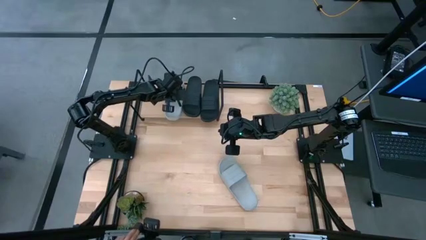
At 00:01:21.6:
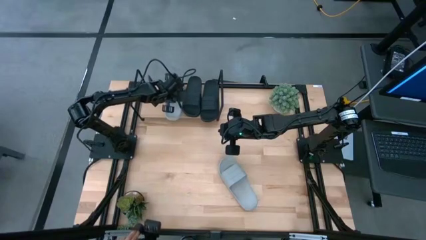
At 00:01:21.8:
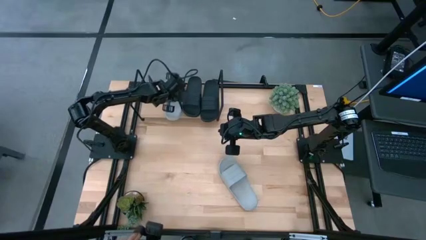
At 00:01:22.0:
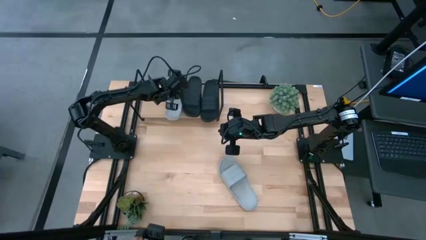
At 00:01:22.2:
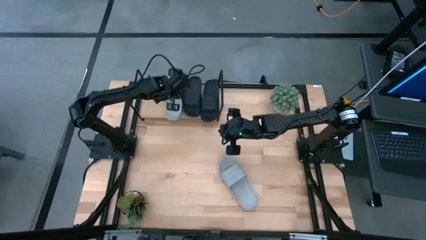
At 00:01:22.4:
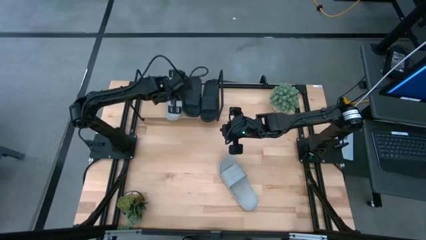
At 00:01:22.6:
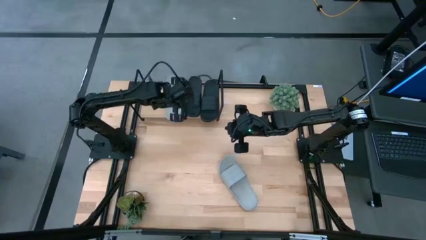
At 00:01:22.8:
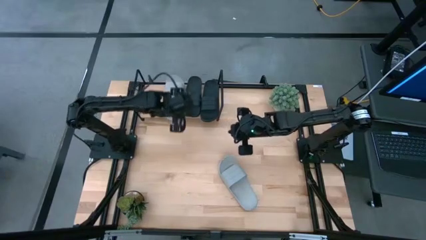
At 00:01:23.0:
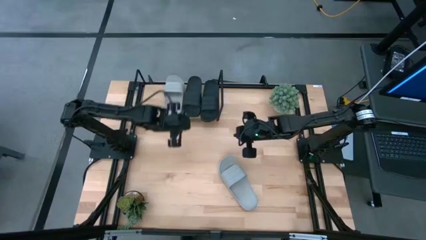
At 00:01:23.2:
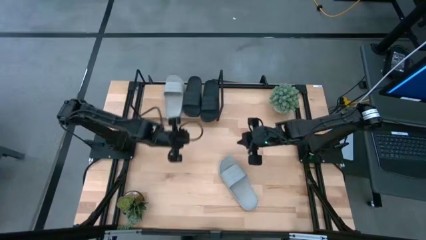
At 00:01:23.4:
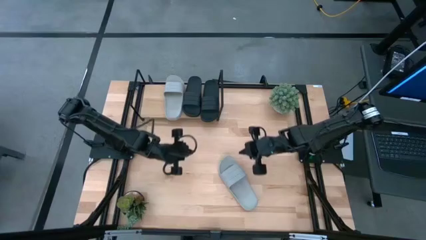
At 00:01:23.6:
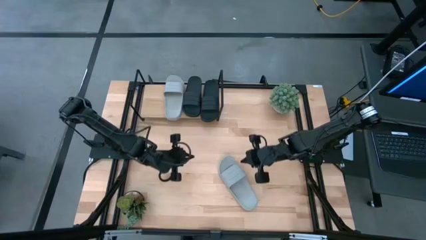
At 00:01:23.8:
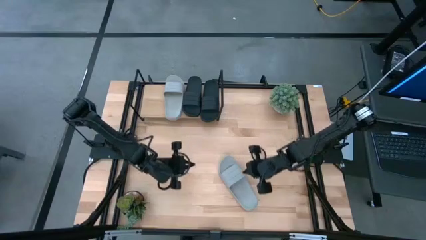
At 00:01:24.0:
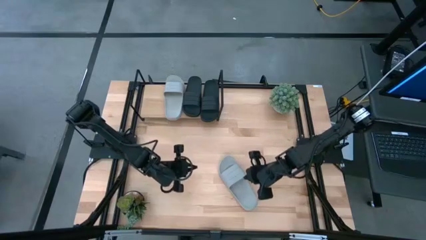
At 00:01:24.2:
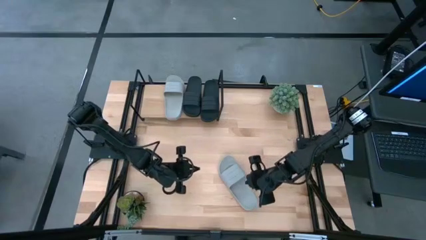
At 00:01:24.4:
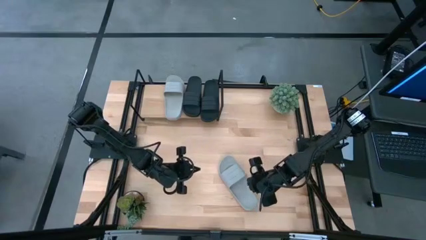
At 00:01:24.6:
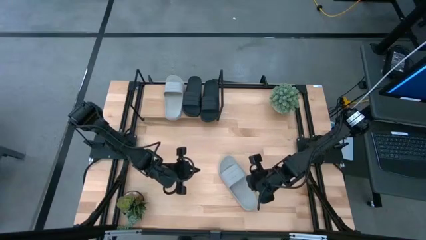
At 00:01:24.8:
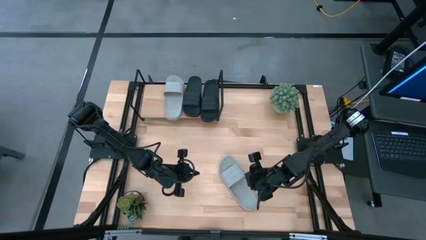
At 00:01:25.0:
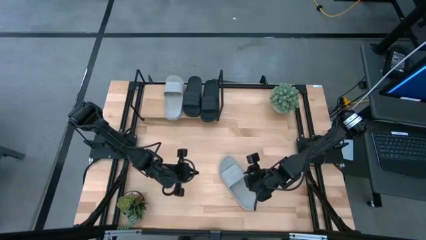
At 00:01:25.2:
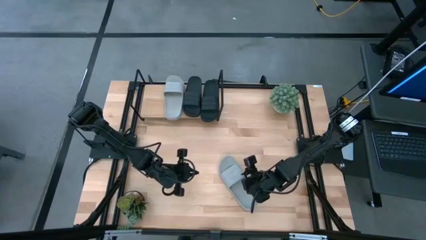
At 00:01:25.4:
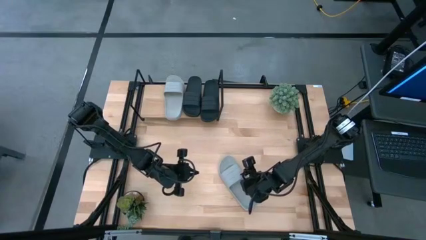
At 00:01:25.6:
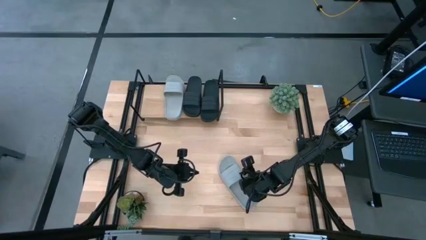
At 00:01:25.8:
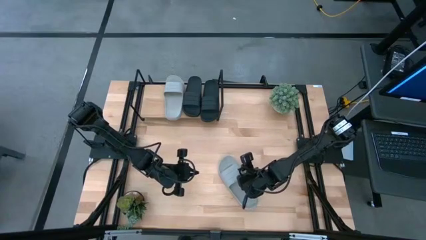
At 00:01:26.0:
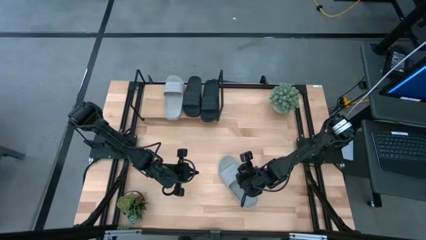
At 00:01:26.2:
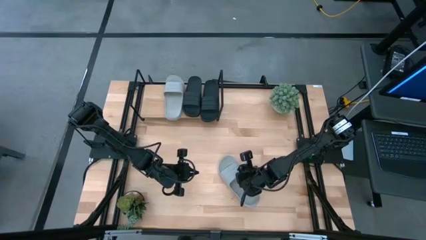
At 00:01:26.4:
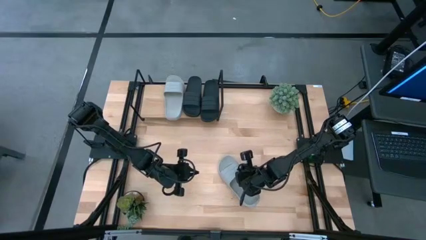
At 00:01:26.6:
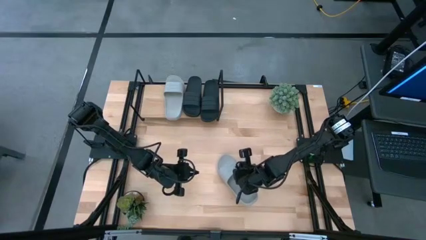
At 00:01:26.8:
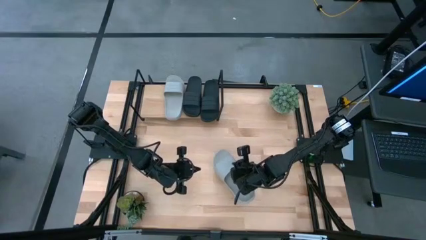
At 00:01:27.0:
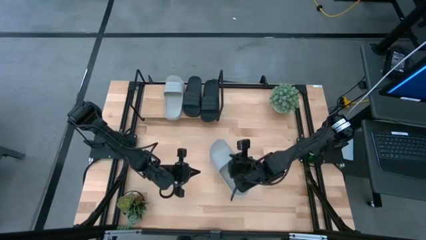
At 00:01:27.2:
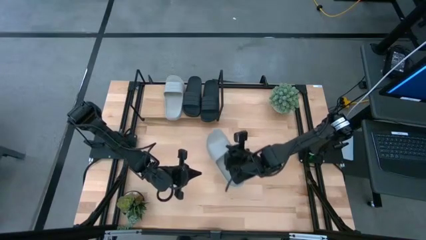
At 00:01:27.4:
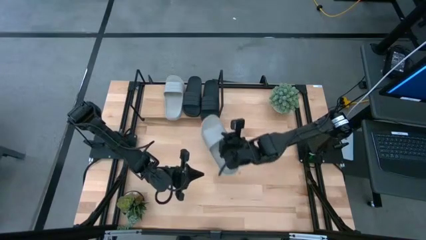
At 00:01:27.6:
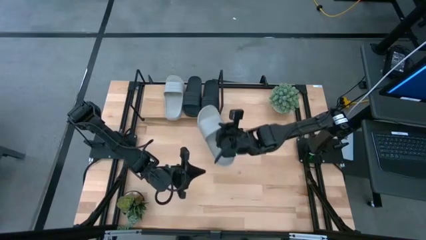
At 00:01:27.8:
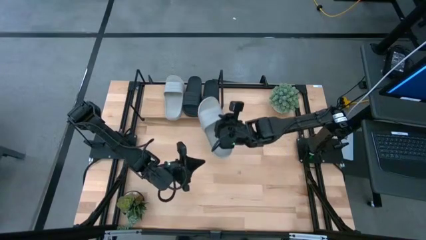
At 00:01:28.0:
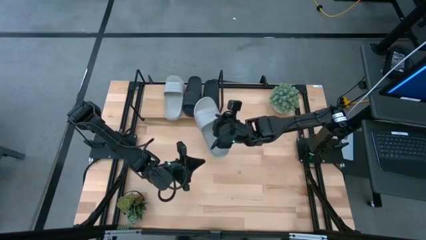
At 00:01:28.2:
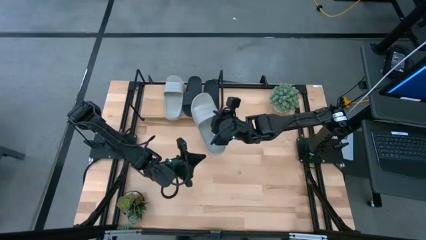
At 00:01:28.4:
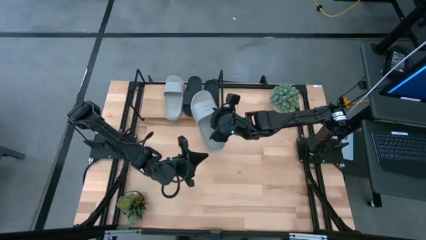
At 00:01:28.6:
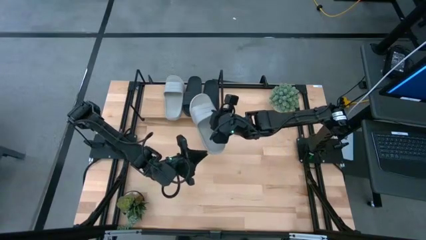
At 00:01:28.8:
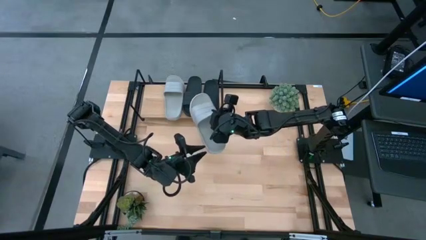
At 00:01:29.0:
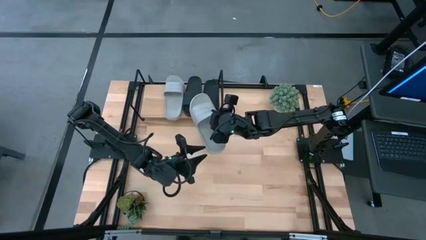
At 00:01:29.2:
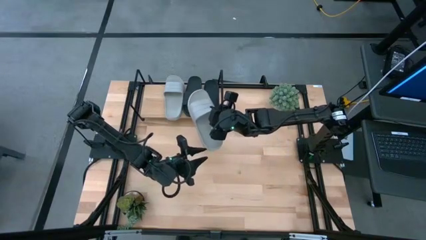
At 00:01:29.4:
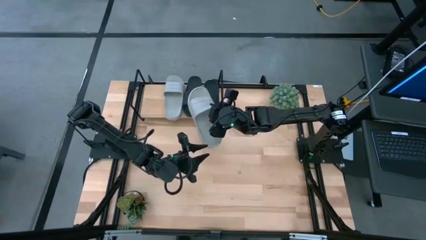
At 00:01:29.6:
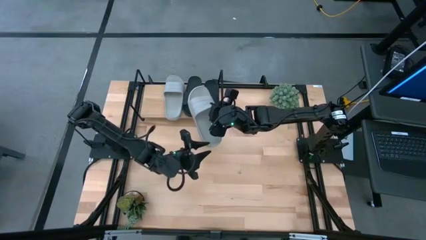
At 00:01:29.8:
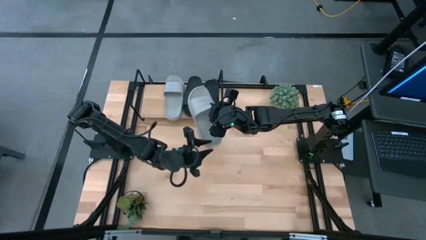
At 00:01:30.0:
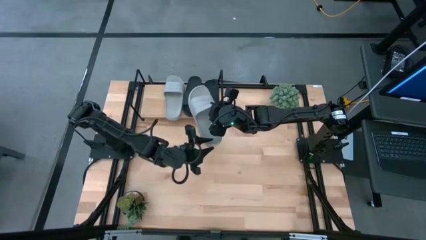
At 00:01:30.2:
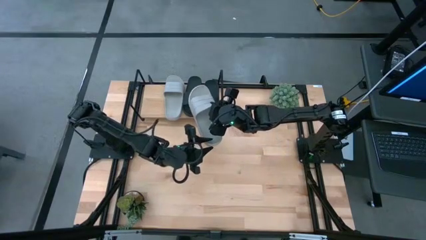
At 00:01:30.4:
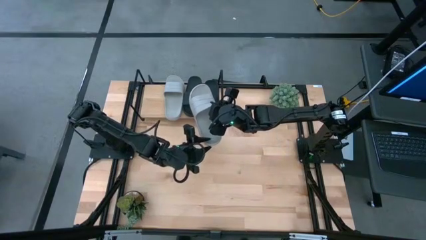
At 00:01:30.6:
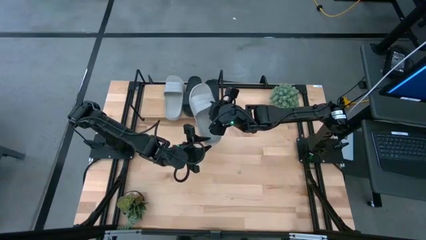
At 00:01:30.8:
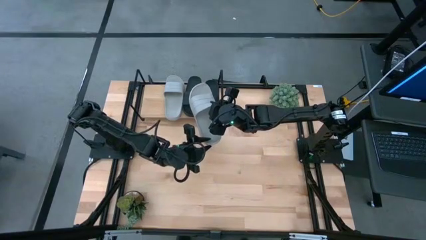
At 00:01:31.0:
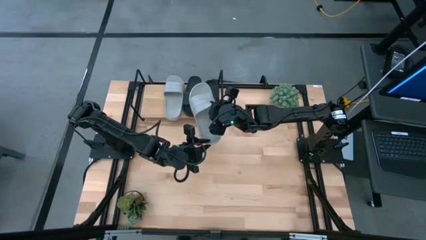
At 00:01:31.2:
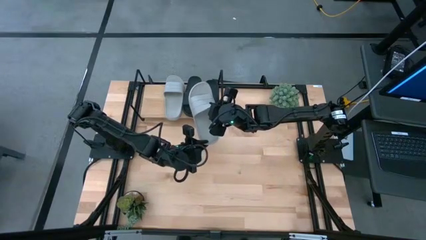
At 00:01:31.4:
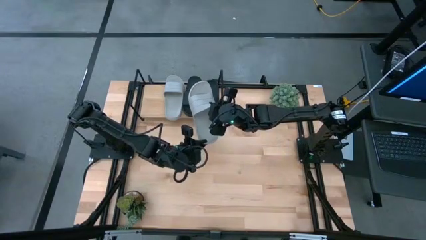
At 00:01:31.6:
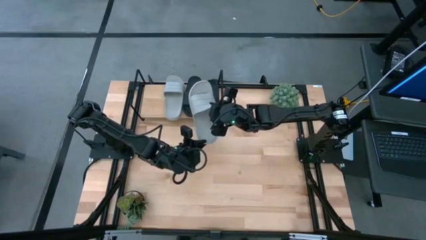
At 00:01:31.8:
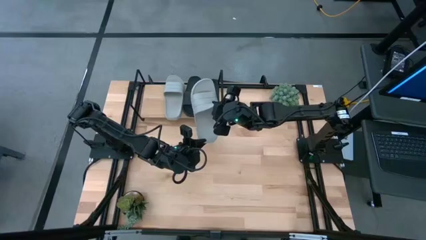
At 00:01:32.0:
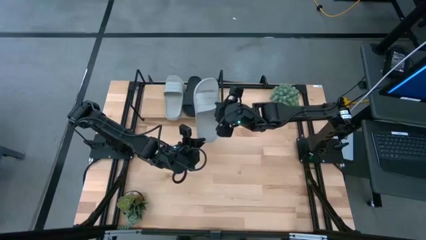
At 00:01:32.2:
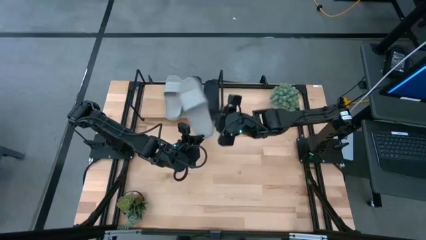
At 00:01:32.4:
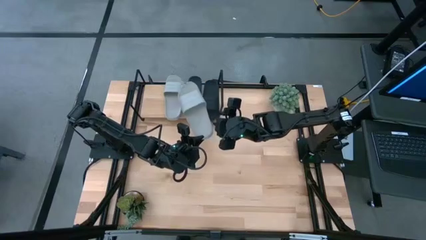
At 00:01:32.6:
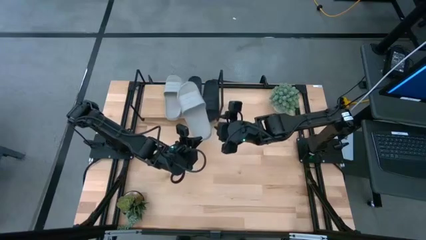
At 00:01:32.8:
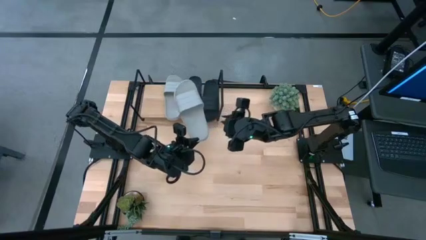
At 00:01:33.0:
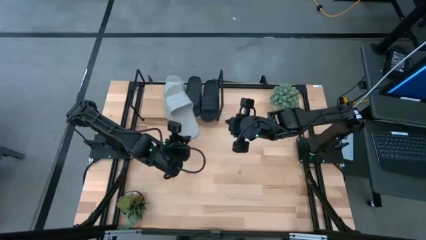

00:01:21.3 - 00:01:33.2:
Task: Pick and place slides into the shelf
Put the gray slides on the shelf

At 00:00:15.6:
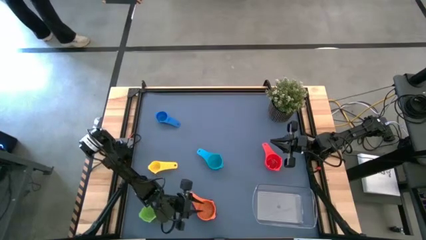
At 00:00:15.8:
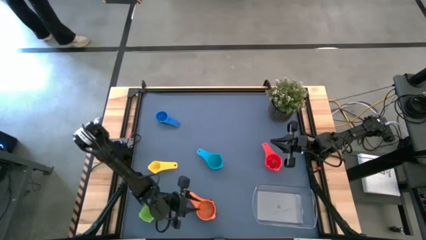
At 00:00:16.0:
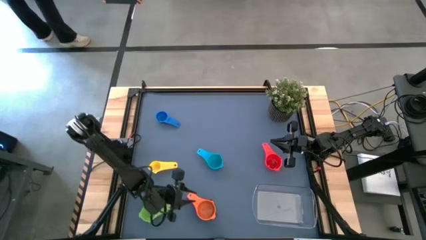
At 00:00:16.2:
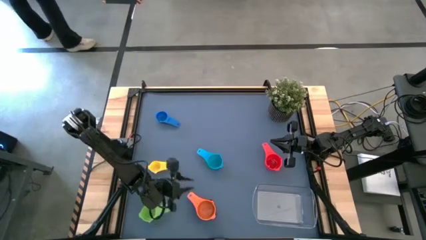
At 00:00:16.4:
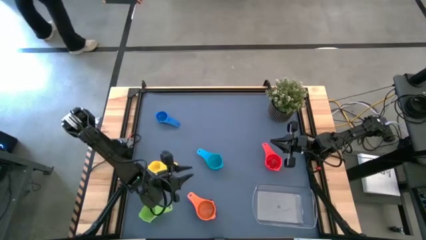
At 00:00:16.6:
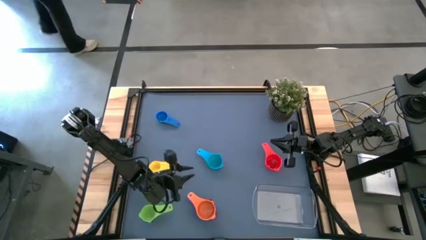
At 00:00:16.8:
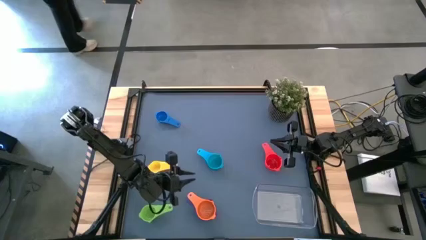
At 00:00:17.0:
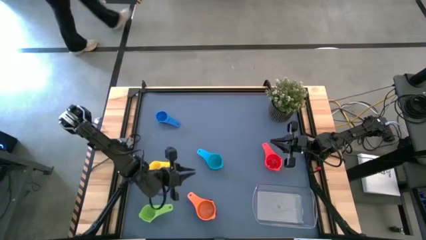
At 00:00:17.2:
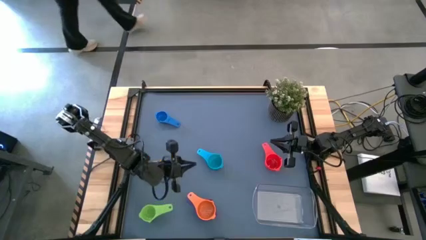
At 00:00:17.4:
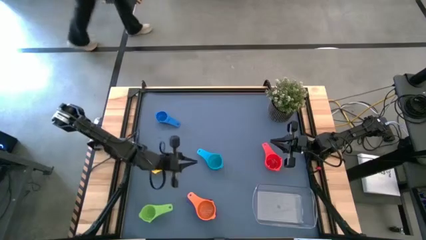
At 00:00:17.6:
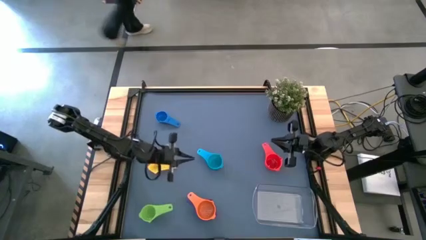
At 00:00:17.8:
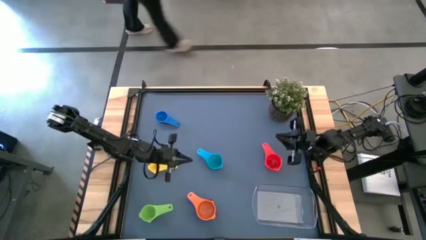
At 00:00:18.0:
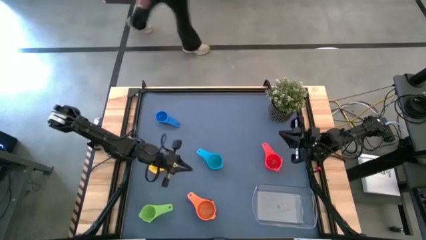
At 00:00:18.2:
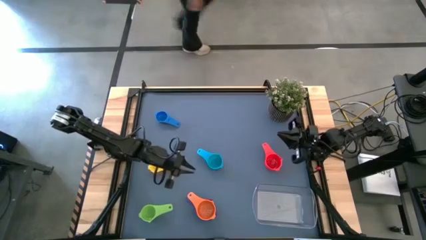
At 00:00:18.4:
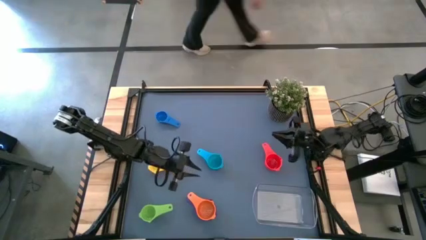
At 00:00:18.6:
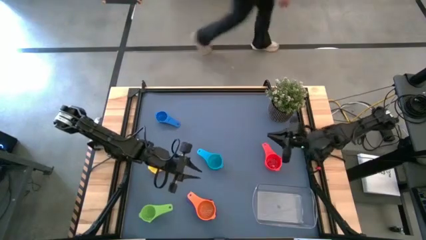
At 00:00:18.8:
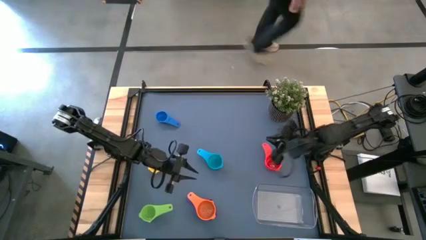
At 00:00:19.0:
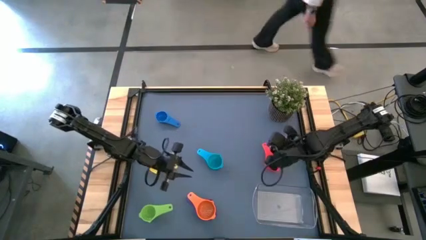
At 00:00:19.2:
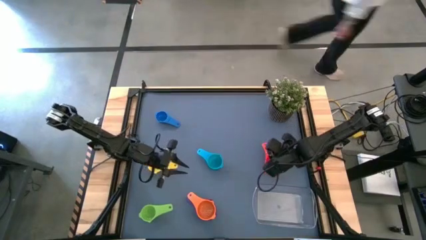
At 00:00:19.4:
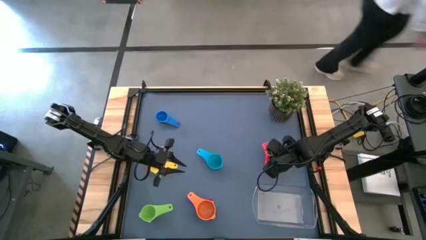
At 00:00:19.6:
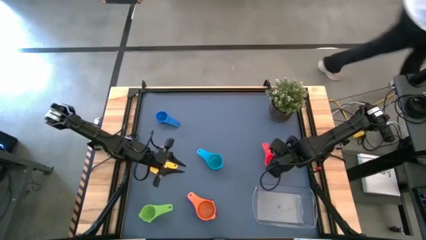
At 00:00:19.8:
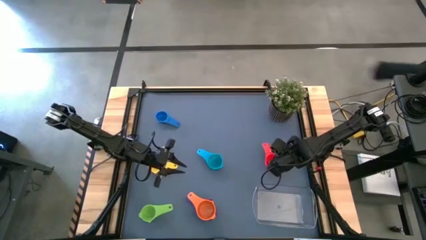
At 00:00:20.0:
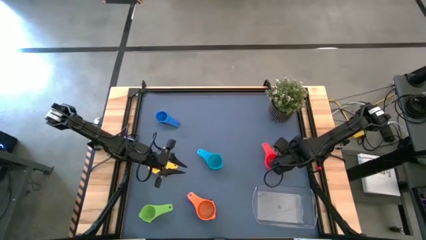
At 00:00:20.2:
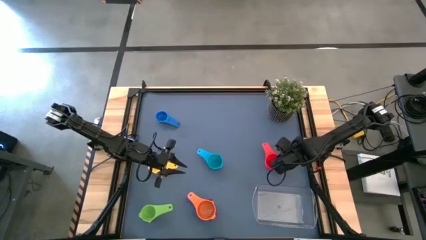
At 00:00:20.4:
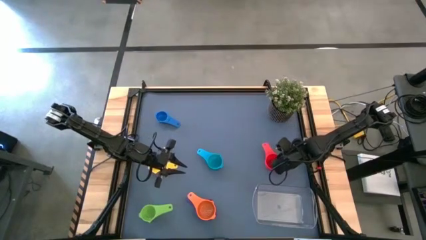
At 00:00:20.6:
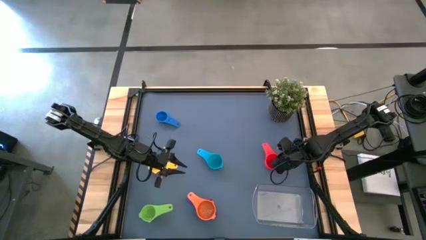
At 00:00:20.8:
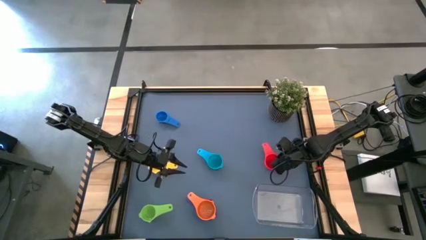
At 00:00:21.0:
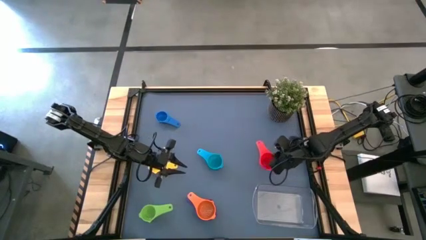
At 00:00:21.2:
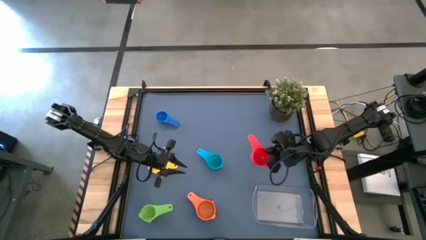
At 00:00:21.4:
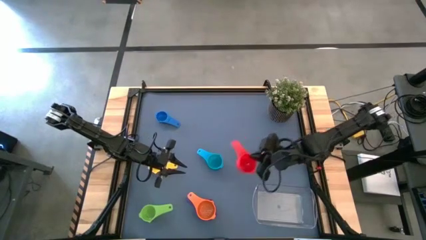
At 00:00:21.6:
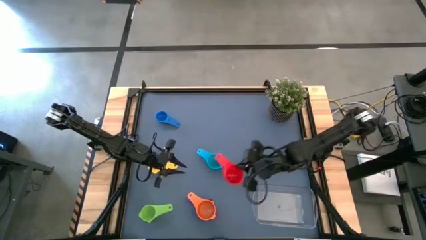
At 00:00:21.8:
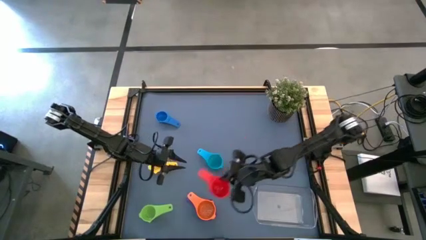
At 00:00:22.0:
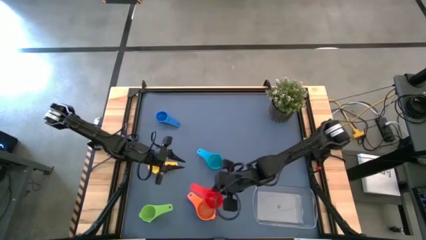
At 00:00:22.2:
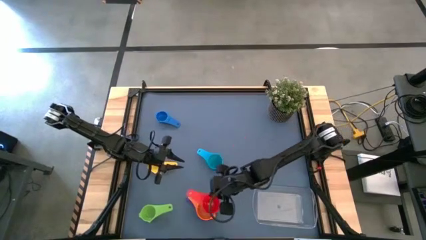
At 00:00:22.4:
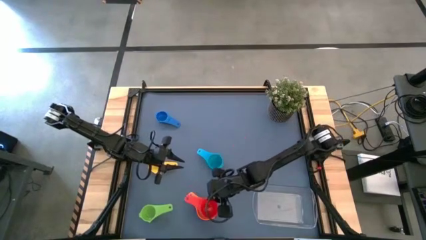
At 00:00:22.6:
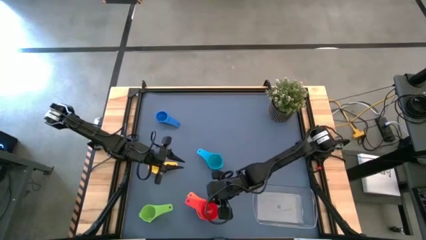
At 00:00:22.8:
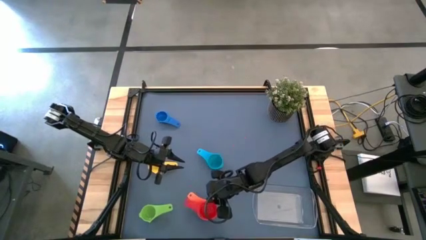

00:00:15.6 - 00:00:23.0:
Task: Nest measuring cups in basket
Stack the red measuring cup on top of the orange measuring cup
